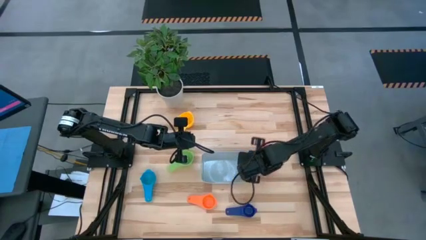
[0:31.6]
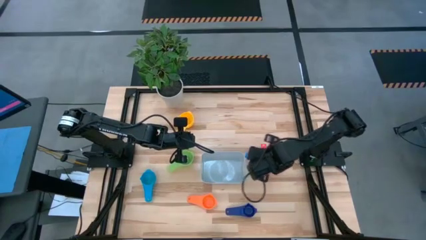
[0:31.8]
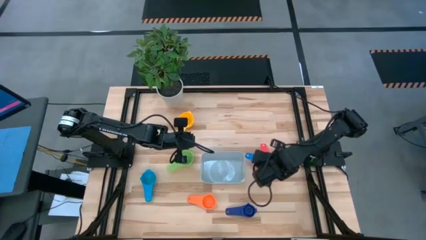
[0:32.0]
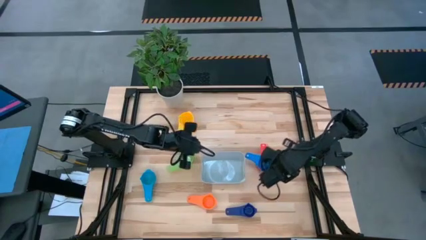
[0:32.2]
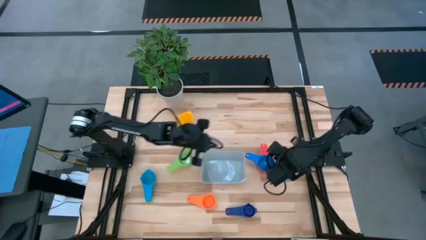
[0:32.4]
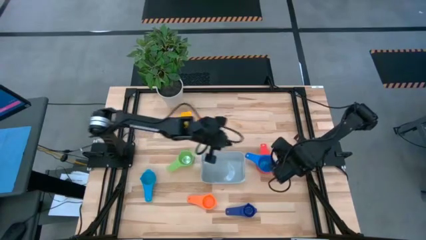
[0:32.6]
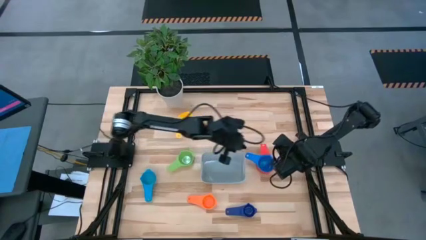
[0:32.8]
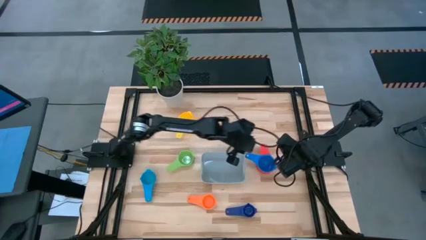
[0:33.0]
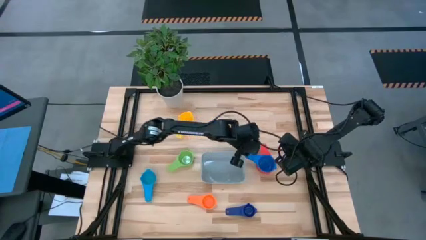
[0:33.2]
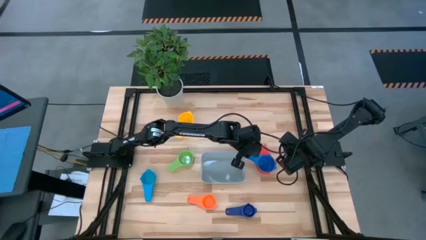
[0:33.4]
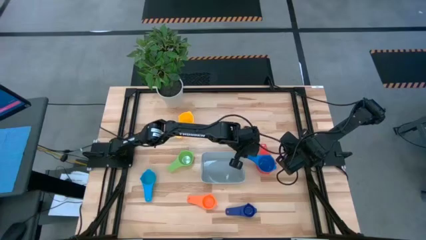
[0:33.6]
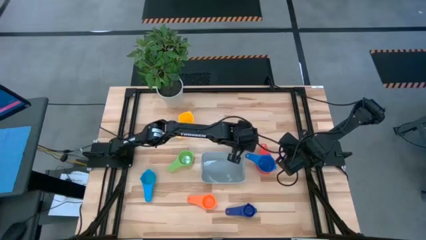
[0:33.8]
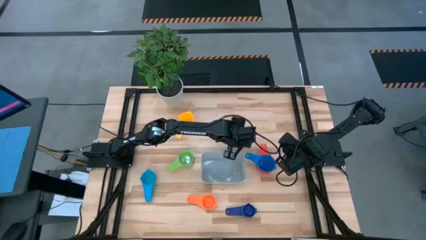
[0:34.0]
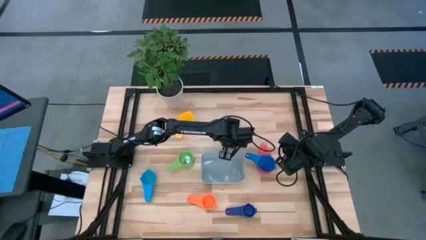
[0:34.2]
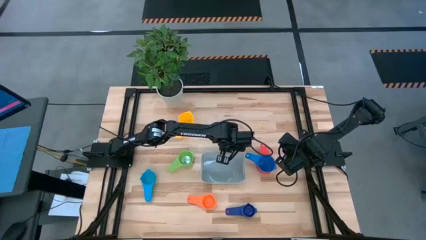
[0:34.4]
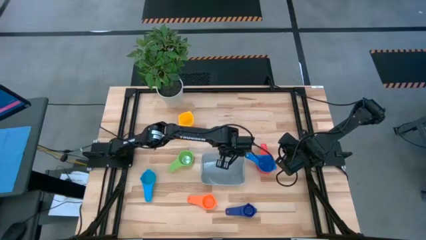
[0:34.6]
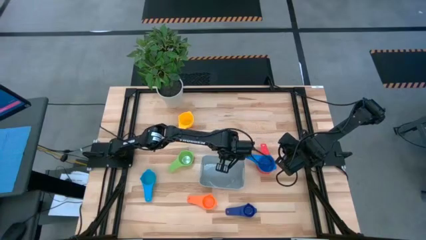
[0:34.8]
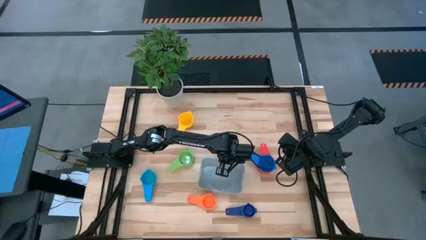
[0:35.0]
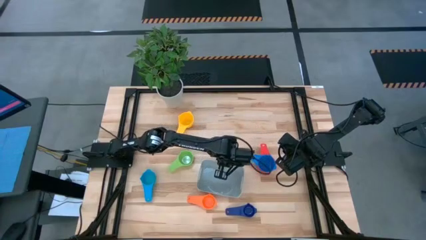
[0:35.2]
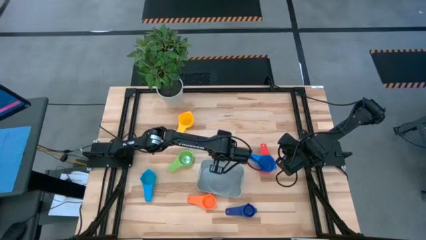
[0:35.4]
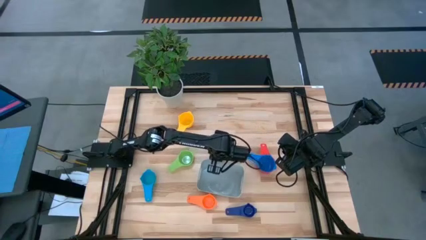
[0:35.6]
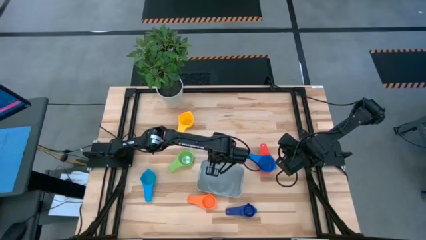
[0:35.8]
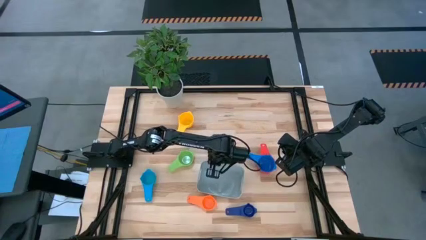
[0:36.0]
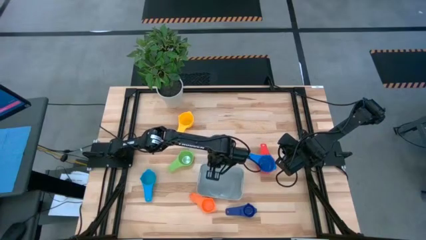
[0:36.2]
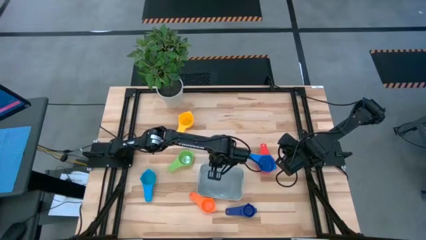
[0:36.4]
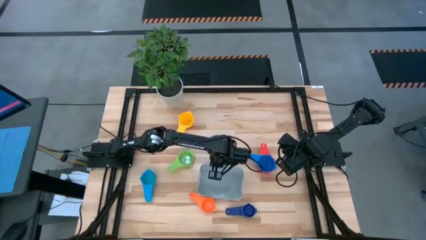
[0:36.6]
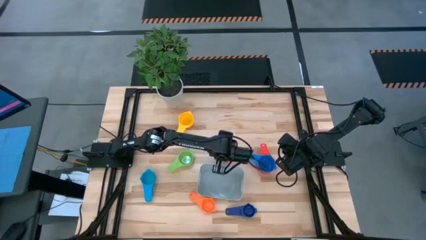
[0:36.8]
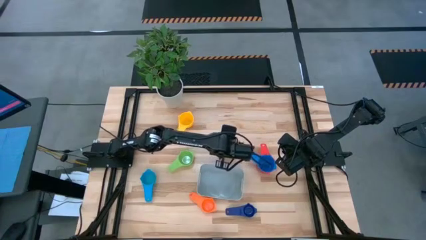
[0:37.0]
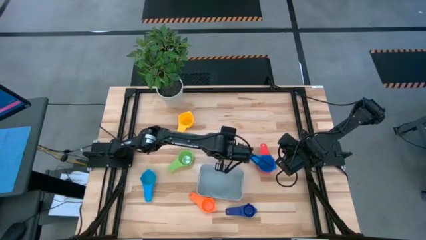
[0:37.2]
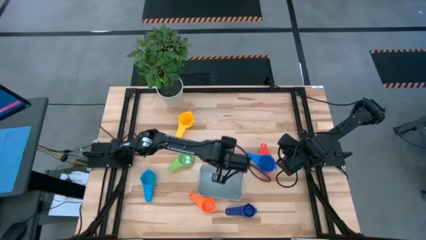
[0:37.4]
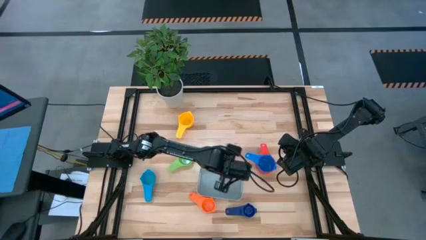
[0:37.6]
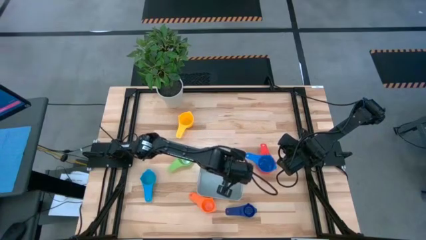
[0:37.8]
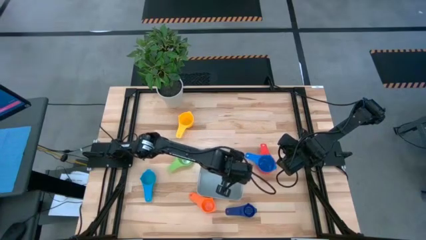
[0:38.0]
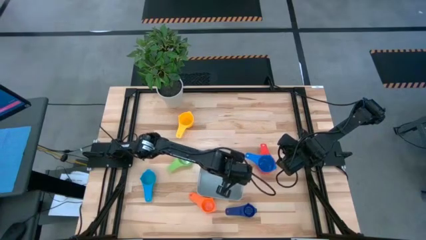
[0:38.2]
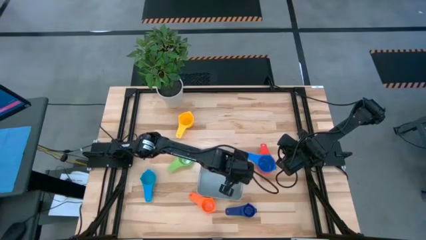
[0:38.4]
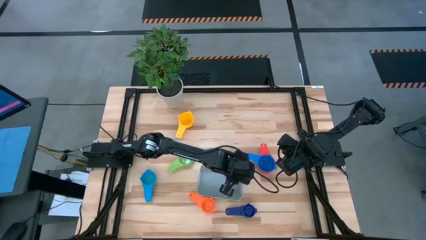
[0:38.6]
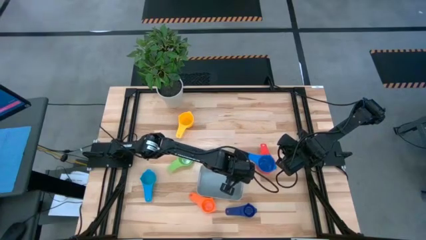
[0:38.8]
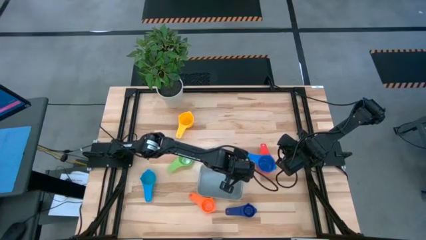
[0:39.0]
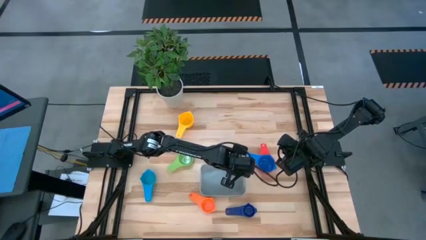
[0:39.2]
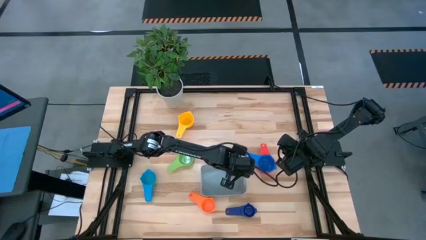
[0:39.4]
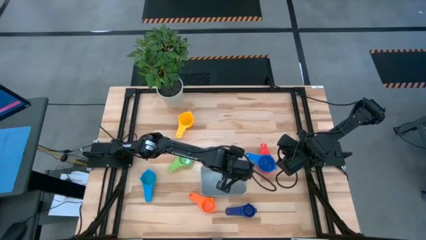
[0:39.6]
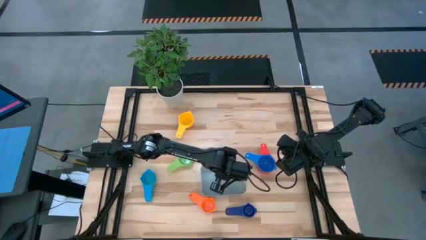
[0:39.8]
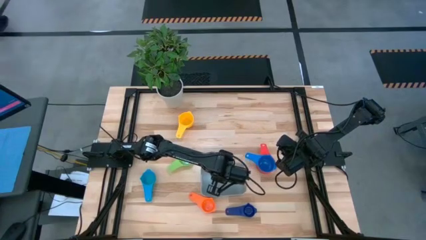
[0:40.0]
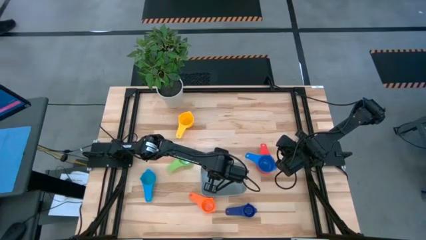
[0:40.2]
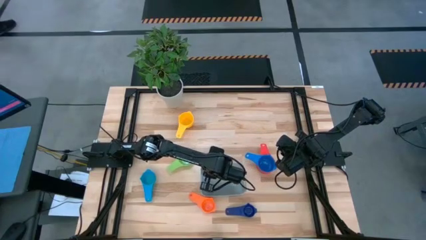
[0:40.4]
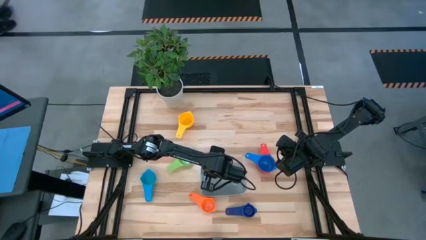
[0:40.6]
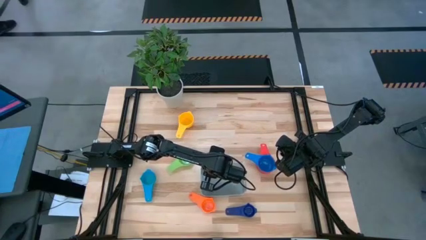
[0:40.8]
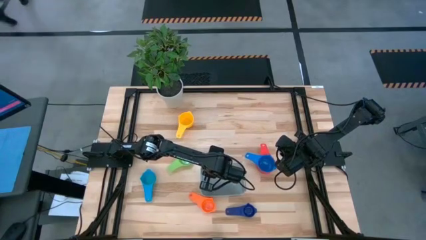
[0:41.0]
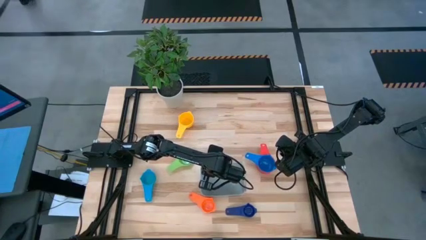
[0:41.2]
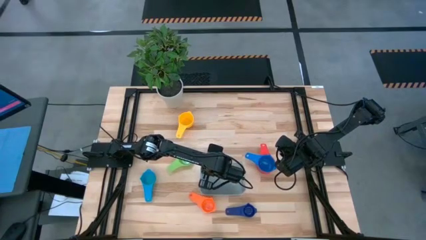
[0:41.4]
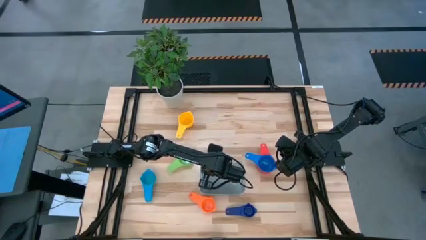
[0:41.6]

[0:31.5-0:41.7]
Task: Nest measuring cups in basket
Adjust the gray bin

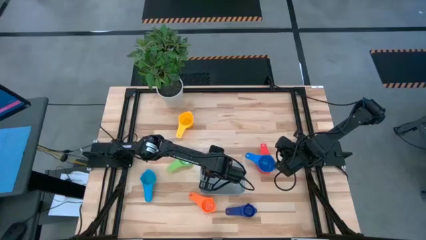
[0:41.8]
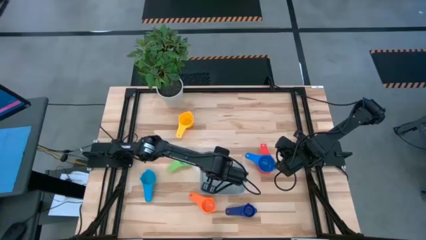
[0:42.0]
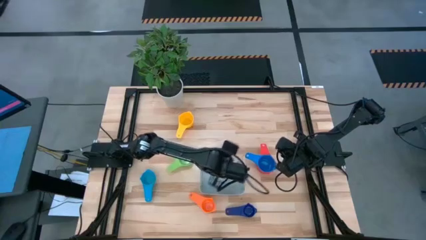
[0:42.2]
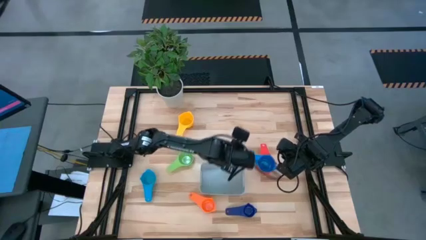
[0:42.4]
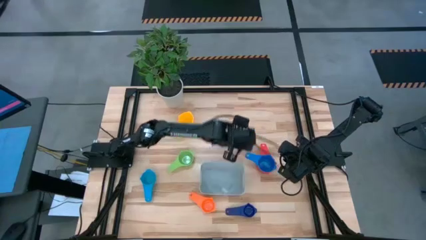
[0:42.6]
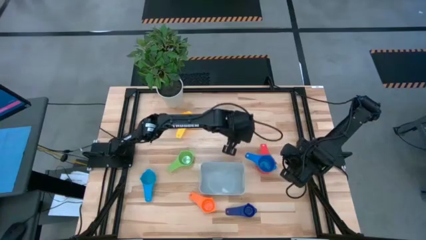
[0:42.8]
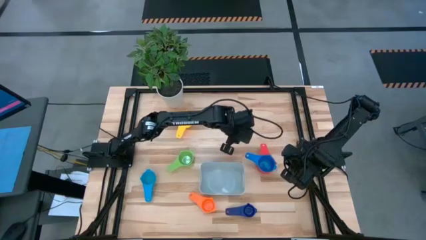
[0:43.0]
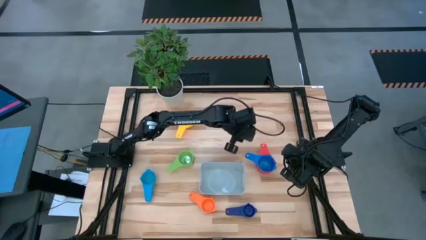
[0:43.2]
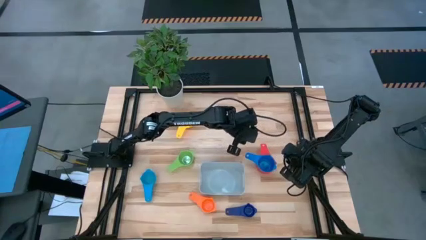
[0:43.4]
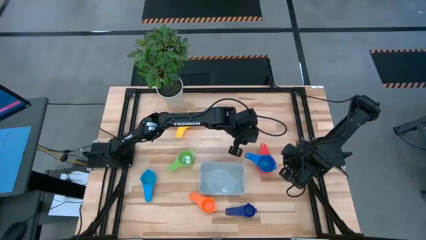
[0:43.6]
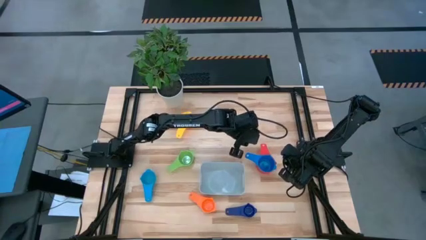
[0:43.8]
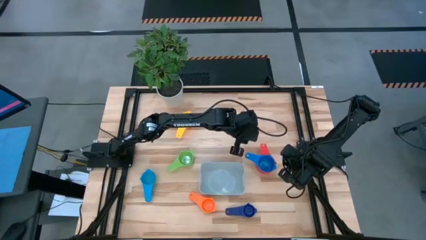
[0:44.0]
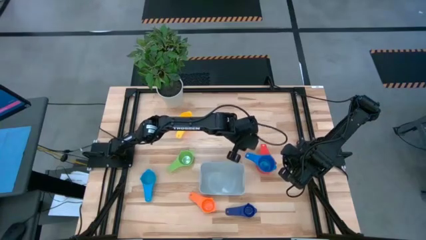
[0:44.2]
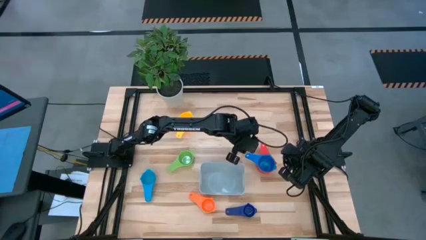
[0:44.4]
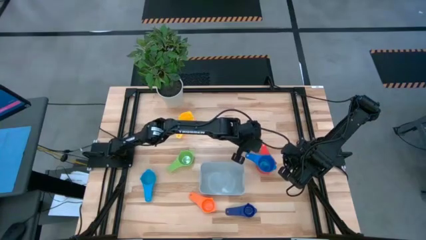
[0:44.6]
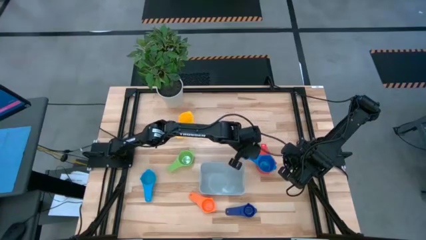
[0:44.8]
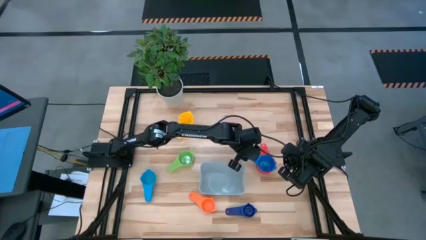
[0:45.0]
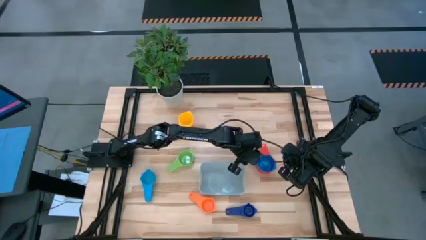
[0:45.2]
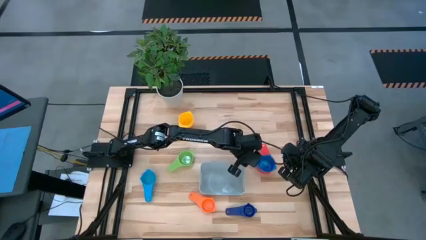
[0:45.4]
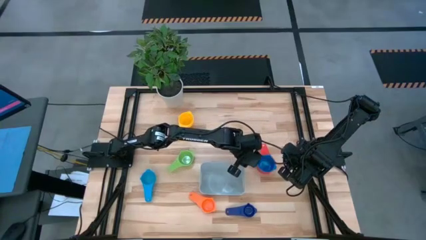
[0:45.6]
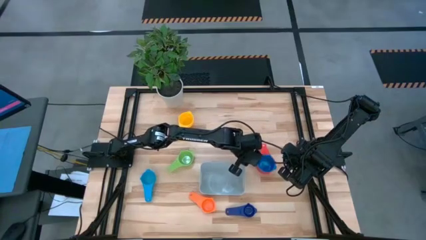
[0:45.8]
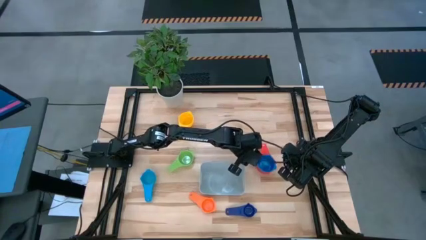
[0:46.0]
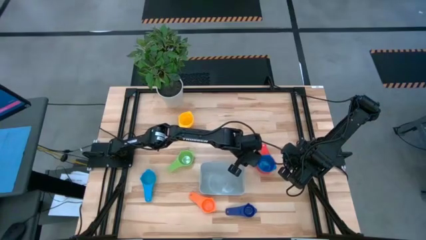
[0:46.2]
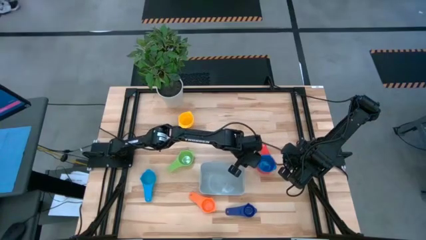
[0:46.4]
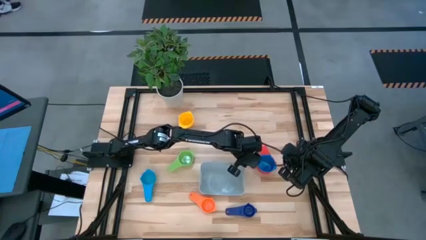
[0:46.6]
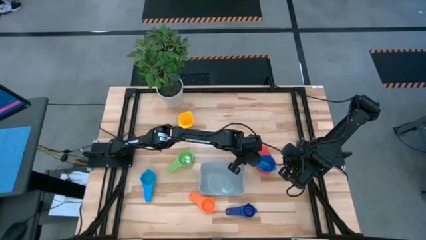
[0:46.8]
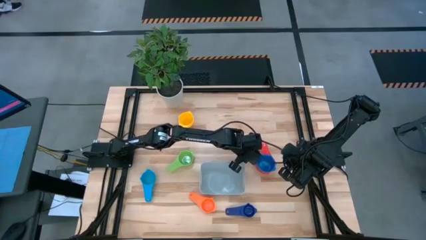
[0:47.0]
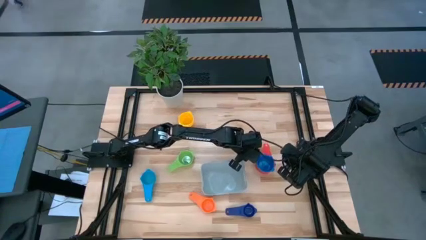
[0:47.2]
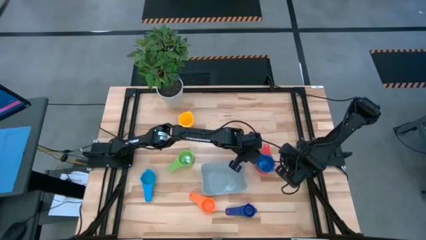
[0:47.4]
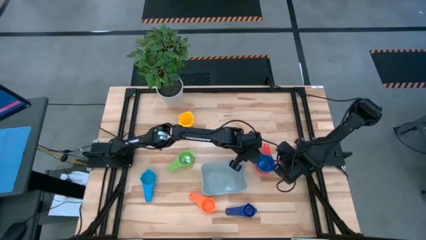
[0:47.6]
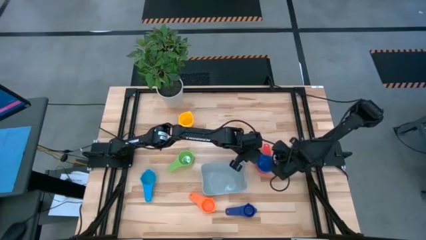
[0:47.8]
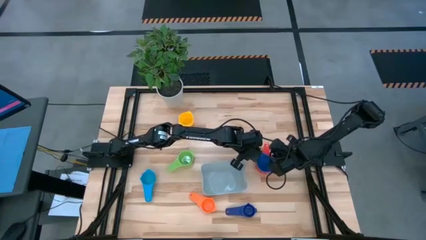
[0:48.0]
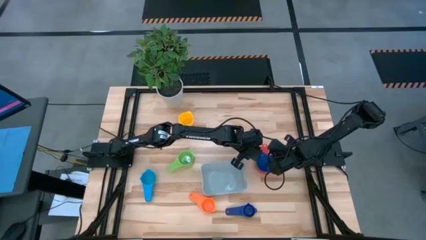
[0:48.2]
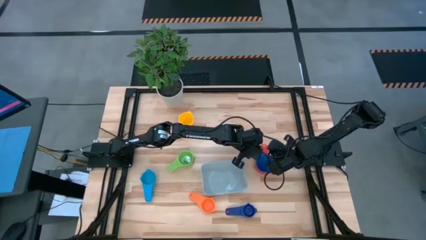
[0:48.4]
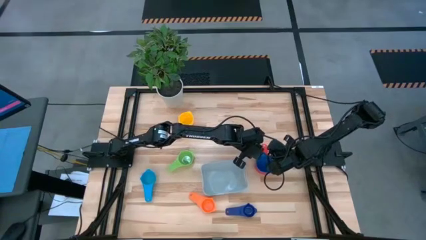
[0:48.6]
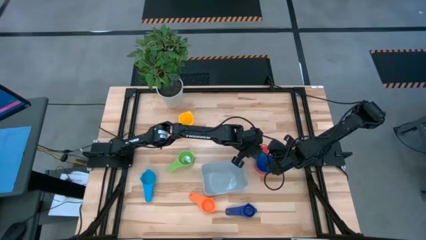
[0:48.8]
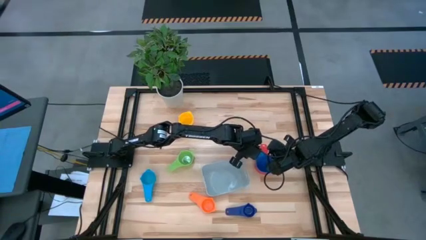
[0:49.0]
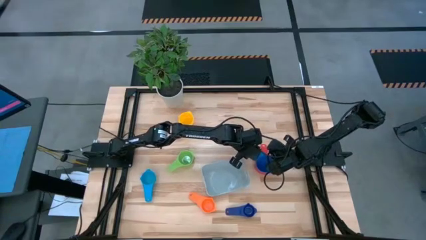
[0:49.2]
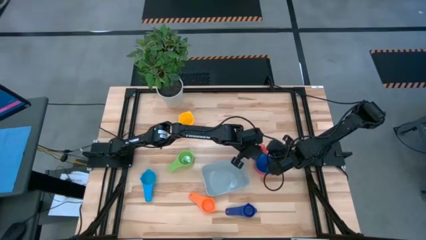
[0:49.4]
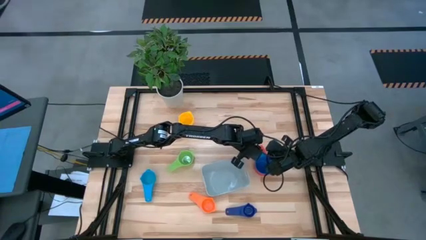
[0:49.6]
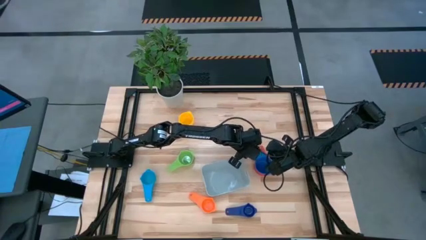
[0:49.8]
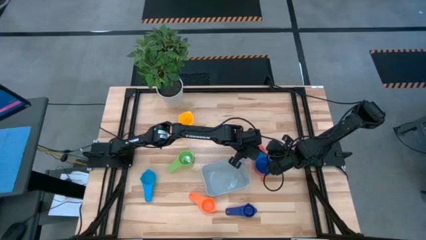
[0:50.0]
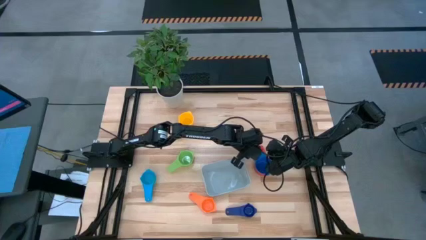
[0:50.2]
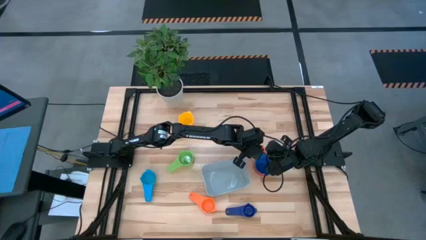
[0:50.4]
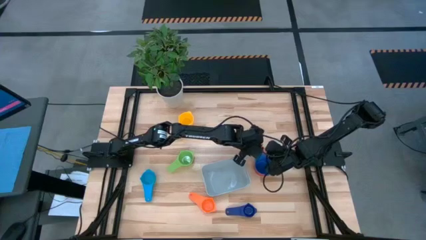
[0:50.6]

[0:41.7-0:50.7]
Adjust the large dark blue measuring cup
